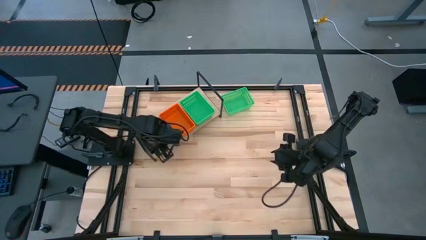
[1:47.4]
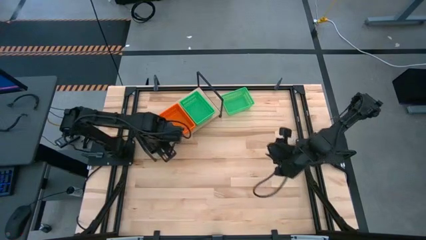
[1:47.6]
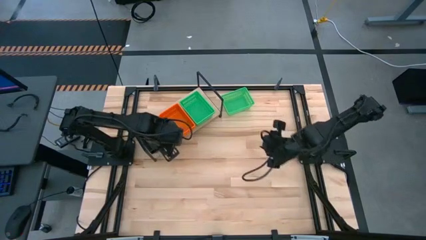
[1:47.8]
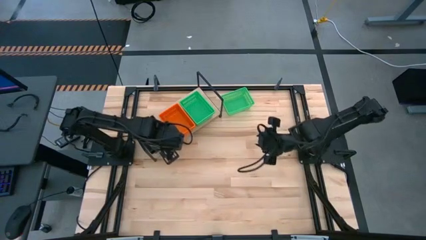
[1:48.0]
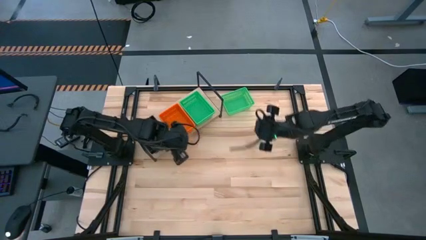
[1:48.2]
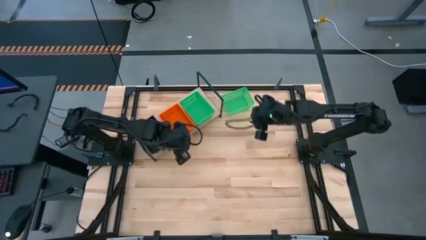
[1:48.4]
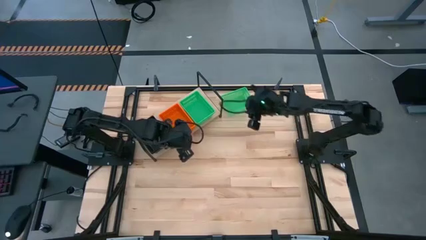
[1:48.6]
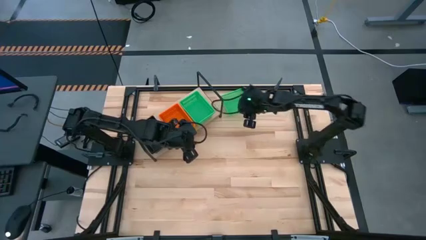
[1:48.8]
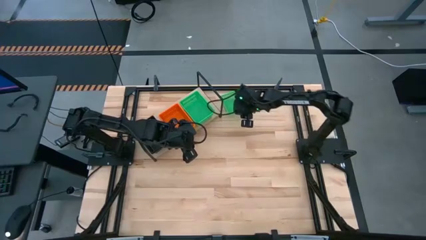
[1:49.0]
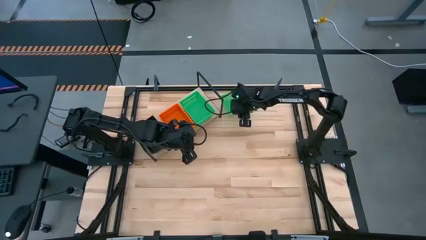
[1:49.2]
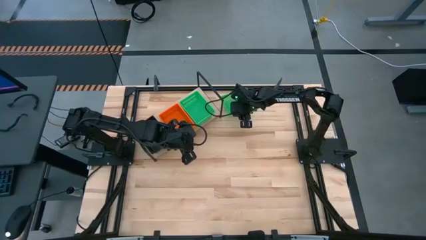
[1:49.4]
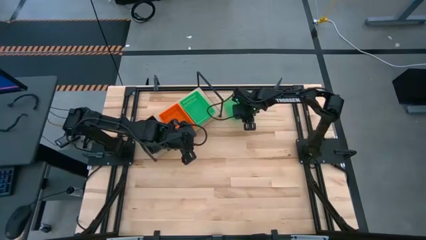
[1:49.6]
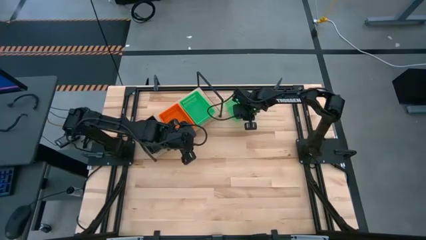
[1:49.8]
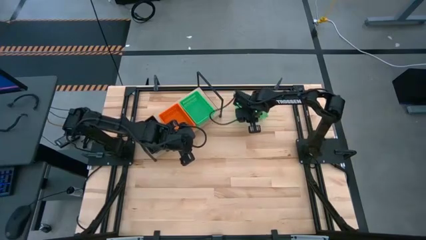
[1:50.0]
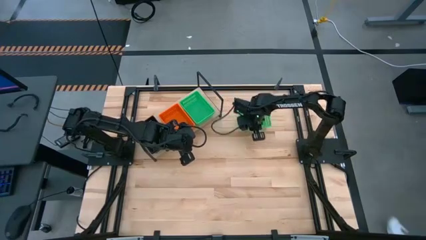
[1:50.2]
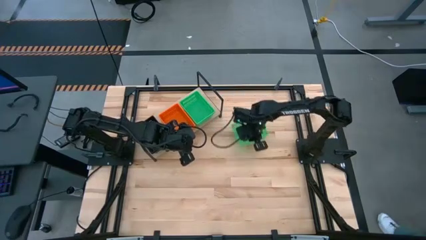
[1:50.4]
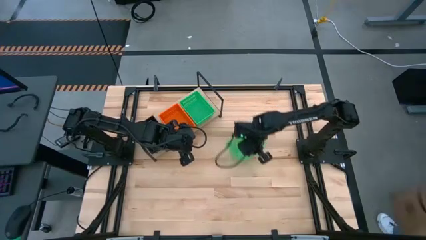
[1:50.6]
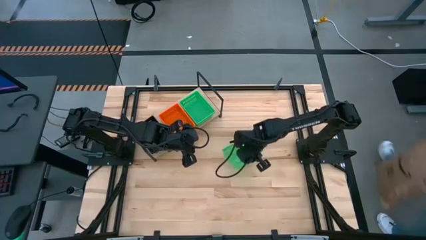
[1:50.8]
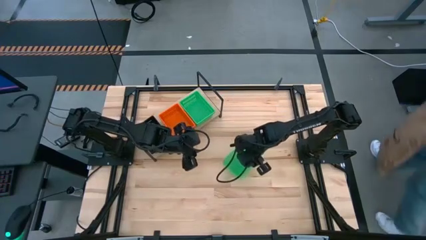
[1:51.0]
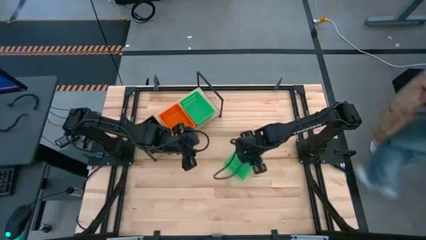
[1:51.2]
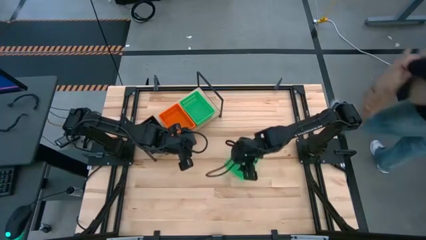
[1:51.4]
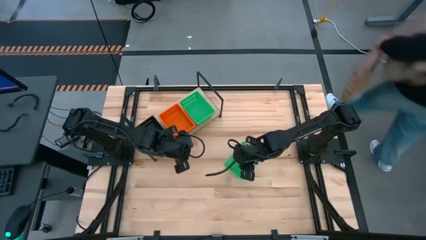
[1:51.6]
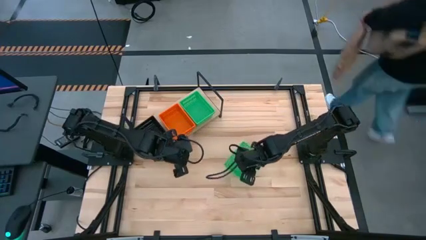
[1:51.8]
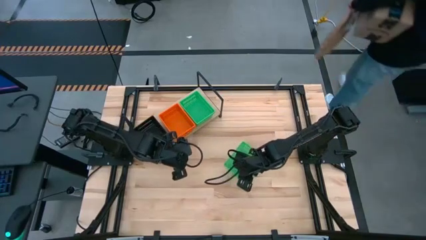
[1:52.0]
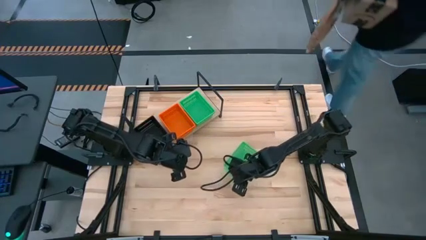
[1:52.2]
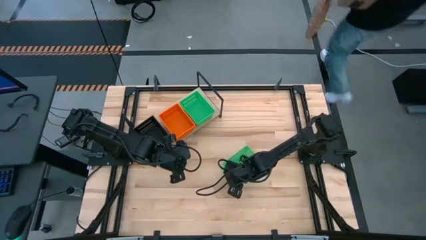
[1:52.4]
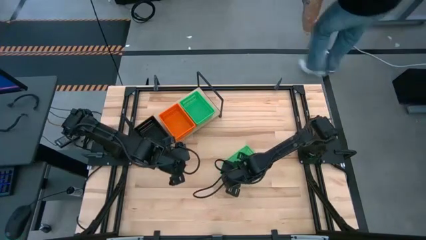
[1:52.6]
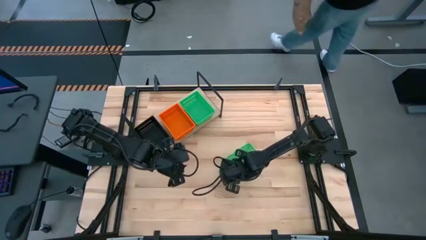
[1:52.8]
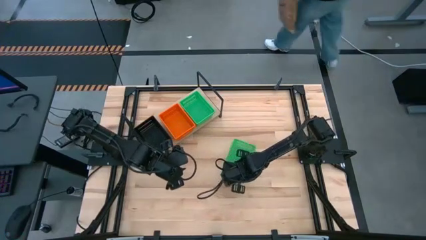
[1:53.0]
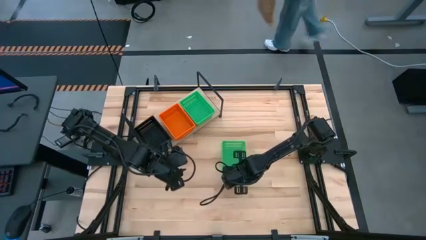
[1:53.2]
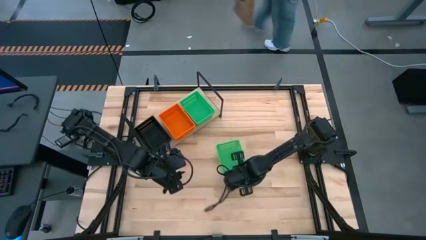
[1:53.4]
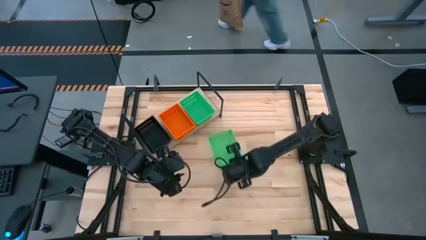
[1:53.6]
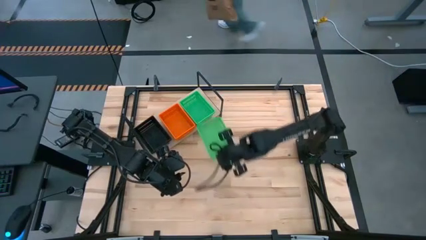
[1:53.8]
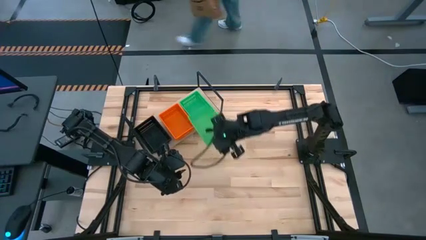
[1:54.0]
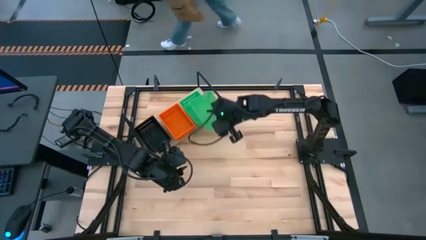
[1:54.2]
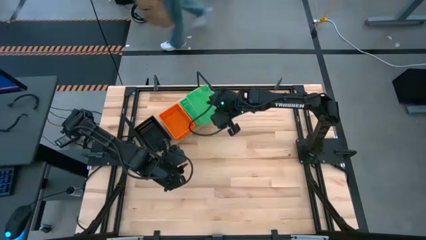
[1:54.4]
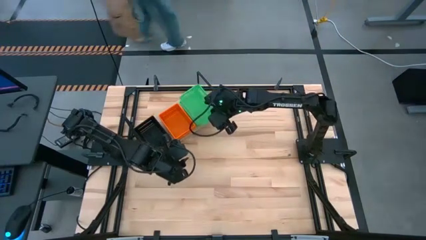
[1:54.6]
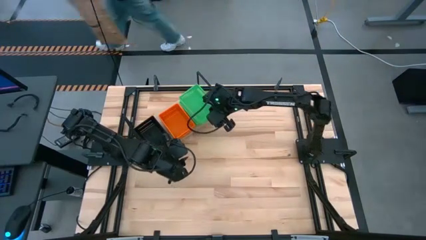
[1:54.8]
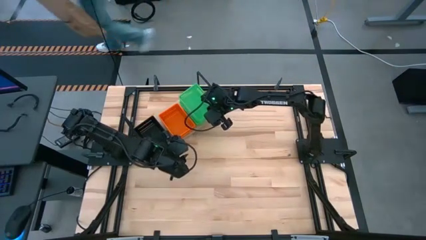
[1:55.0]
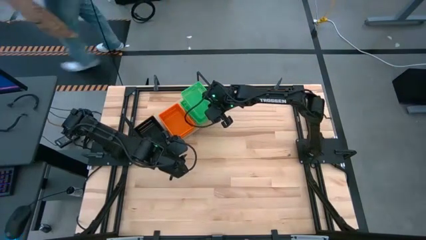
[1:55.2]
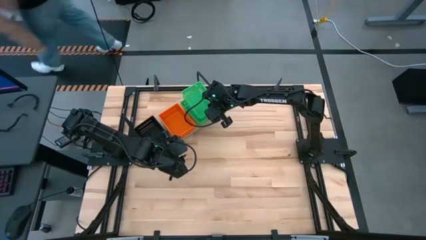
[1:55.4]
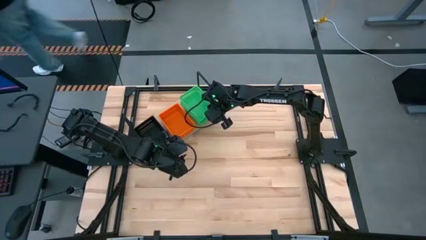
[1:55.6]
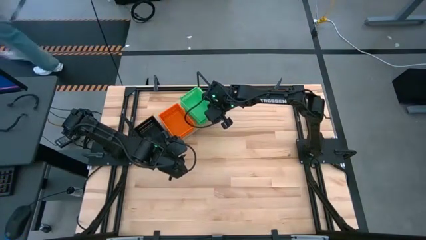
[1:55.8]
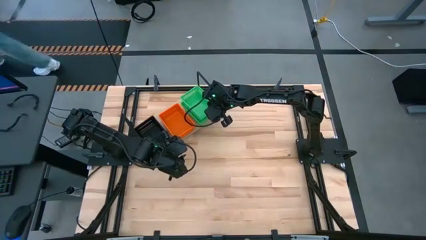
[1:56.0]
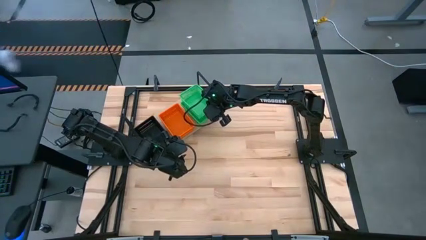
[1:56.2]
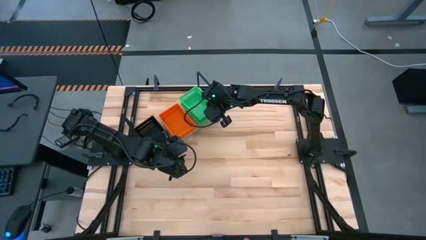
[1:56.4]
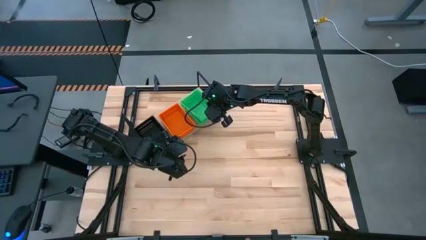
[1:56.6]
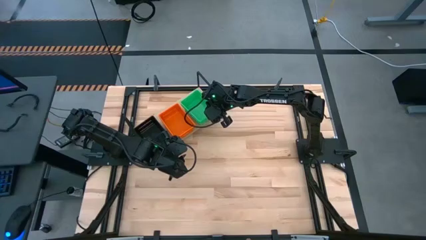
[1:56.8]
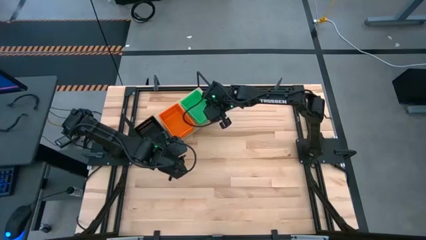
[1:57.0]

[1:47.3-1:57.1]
Task: Stack baskets on shelf by color
Stack the green bin on top of the green bin on the shelf

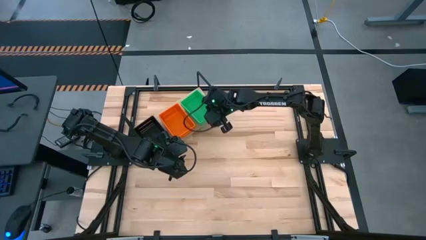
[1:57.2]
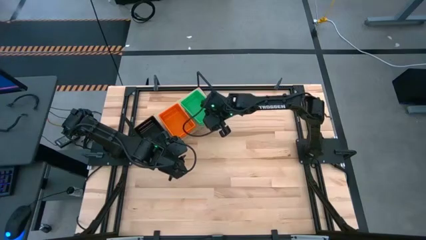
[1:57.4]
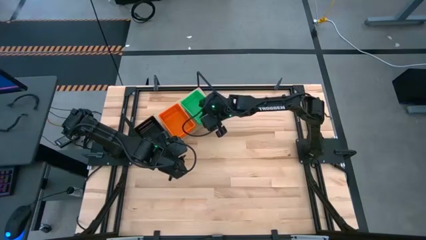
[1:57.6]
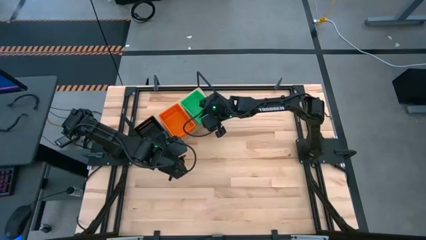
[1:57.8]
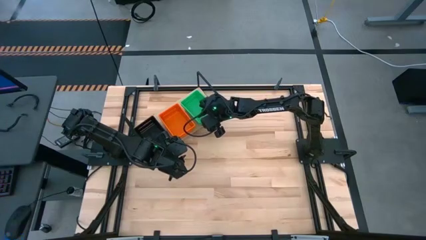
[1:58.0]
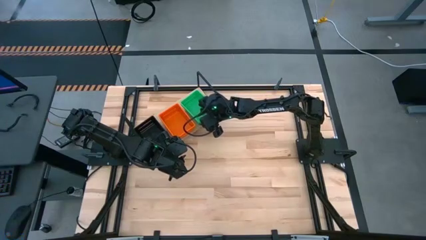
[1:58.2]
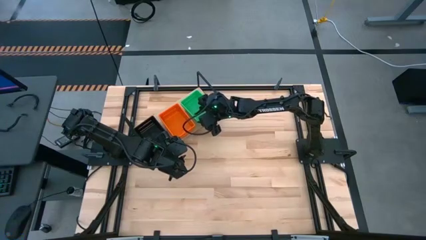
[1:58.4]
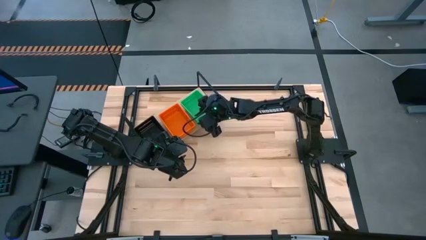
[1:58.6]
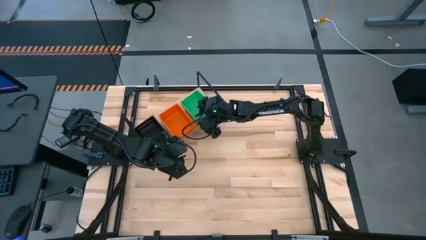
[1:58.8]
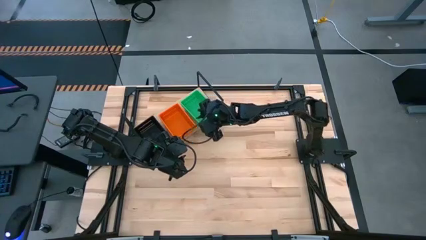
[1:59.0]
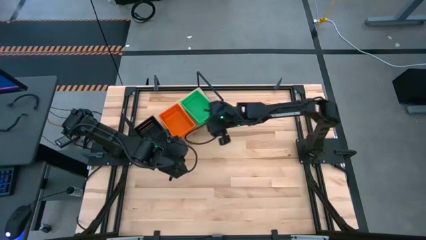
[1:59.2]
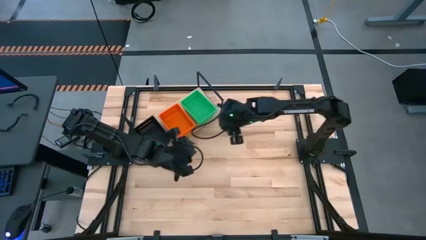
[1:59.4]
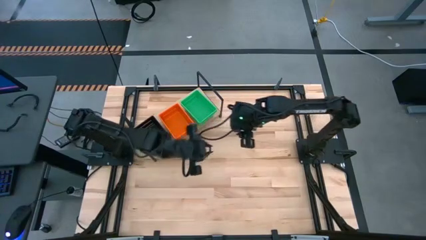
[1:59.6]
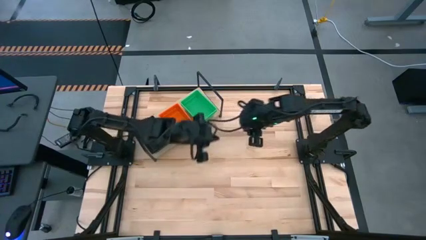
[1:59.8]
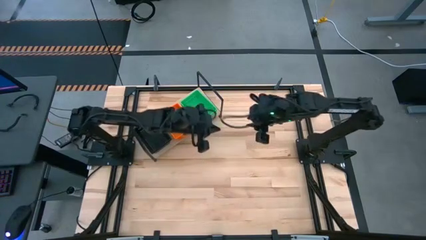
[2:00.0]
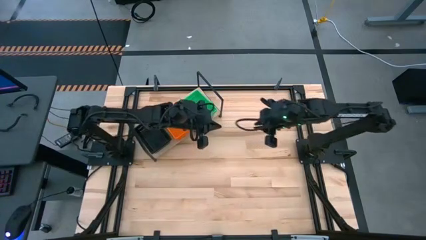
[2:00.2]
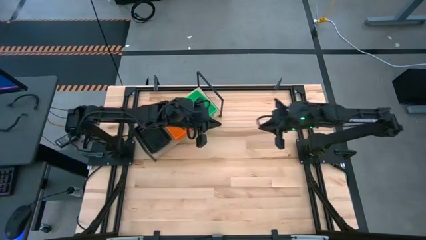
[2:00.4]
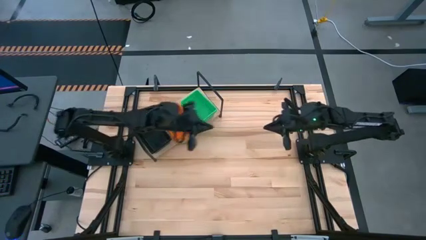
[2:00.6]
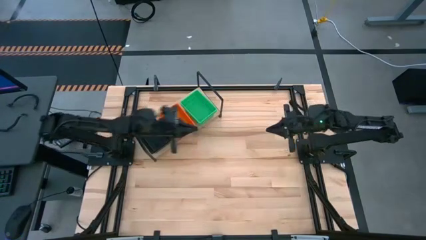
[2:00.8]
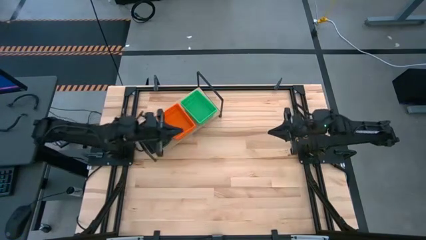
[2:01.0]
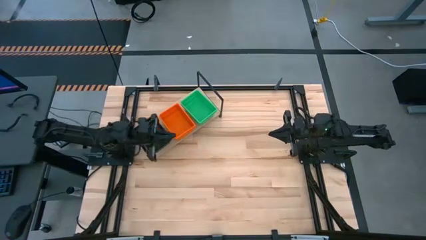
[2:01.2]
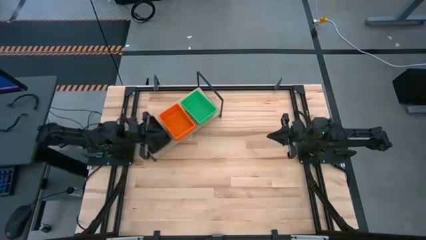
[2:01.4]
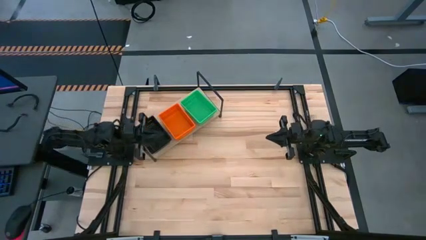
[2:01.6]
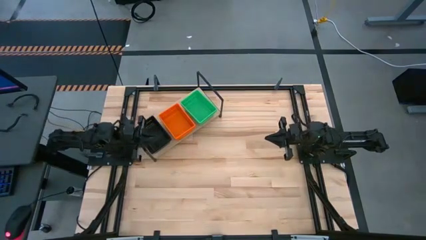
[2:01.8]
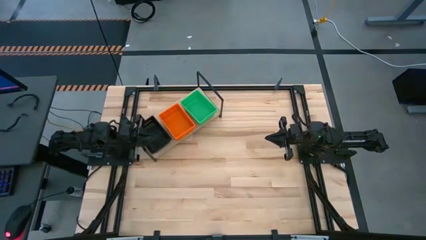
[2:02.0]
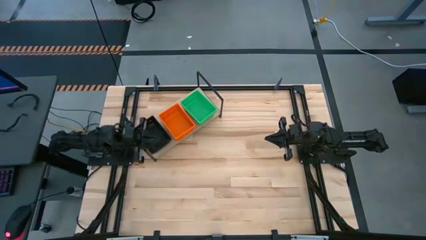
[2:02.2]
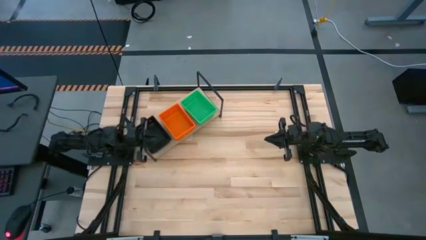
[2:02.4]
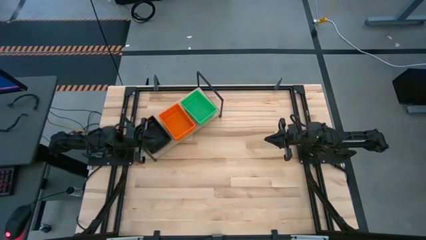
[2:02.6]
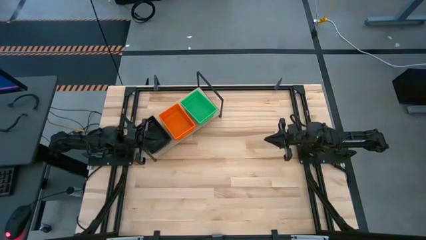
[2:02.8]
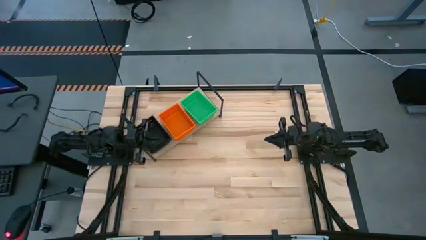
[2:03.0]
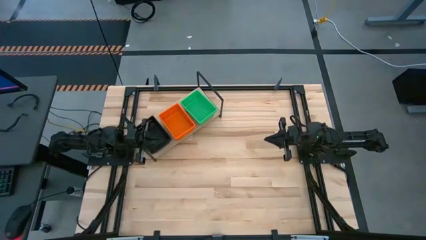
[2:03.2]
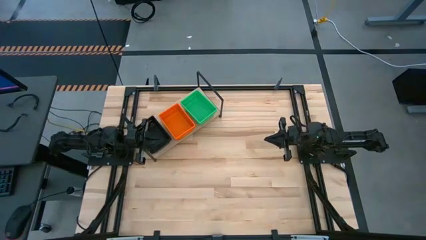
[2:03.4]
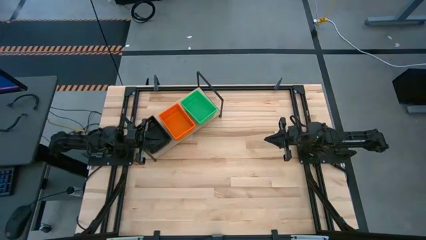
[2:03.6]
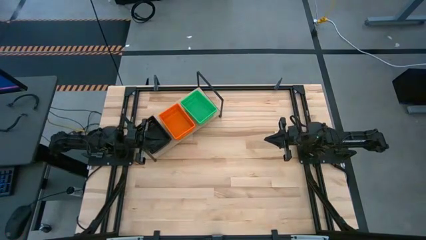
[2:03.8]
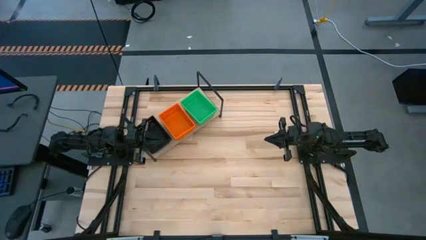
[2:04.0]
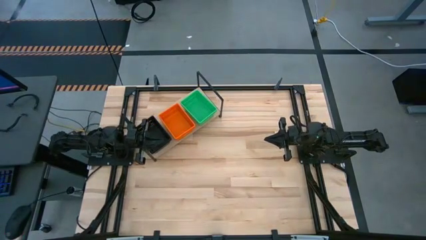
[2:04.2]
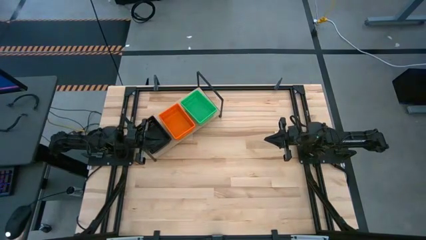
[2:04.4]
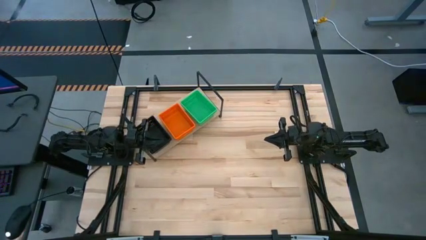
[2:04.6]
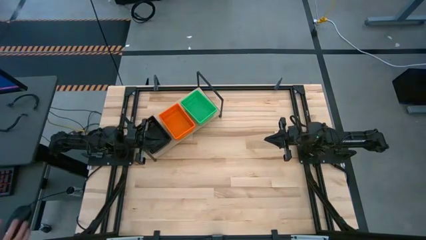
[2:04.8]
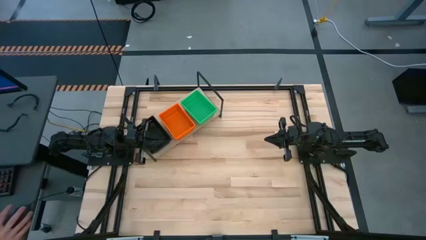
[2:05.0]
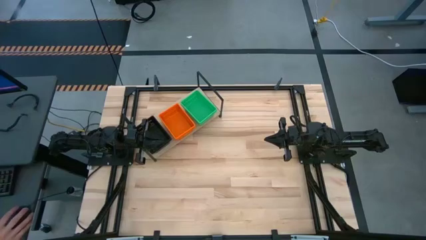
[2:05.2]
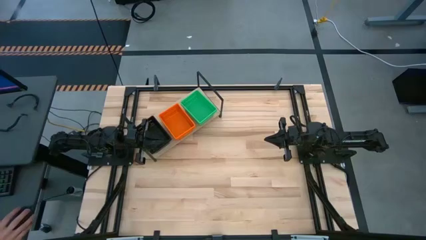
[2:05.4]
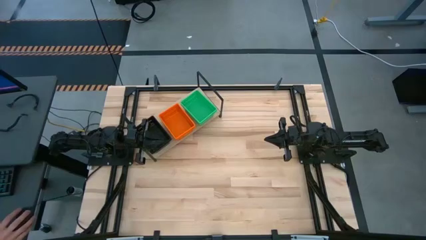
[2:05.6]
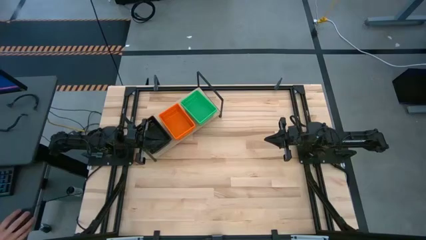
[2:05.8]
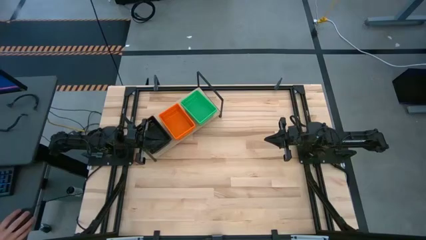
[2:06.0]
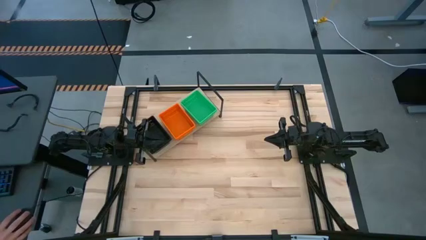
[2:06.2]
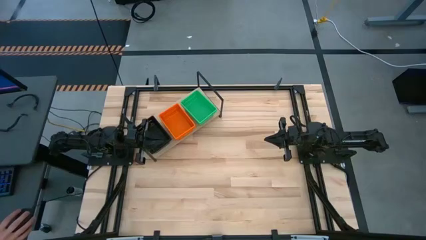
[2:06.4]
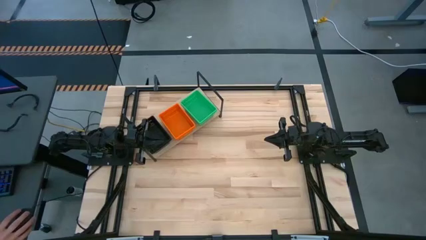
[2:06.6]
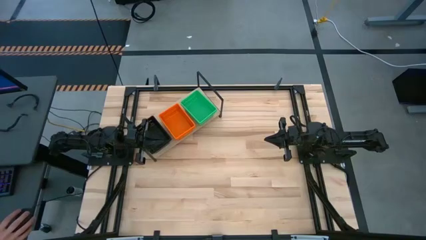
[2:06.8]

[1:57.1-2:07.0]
Return to Home Position
